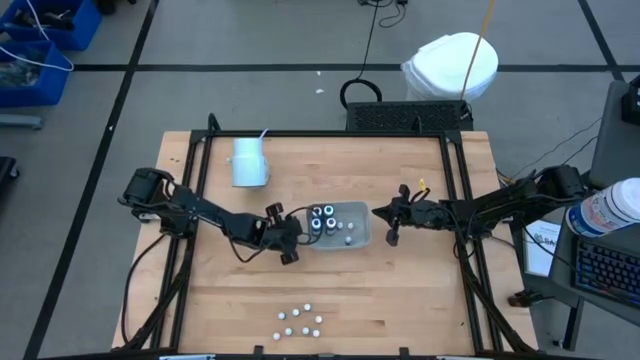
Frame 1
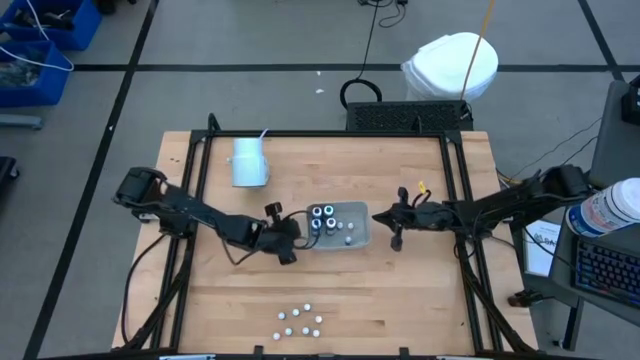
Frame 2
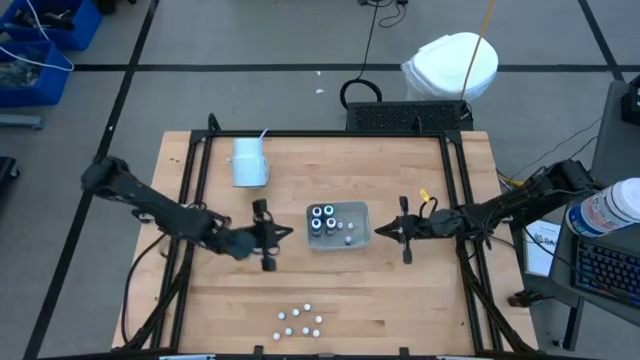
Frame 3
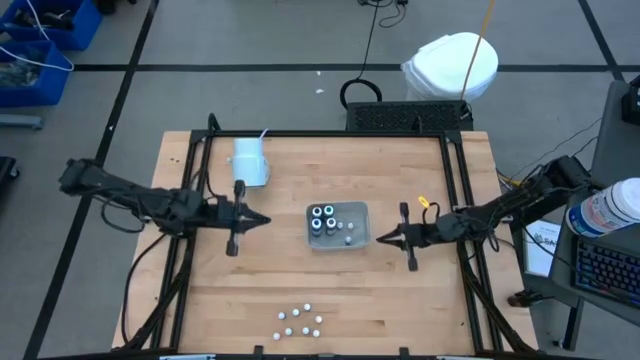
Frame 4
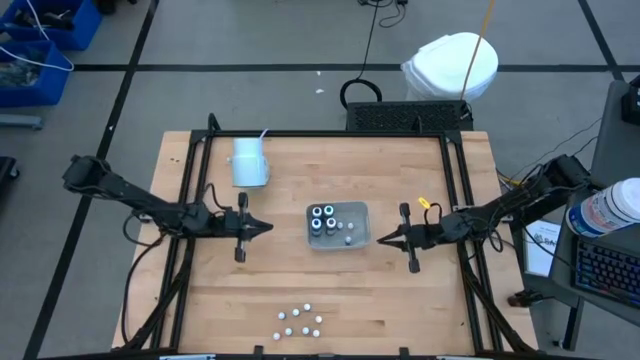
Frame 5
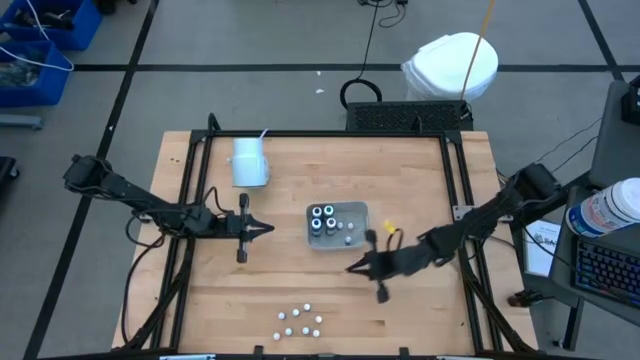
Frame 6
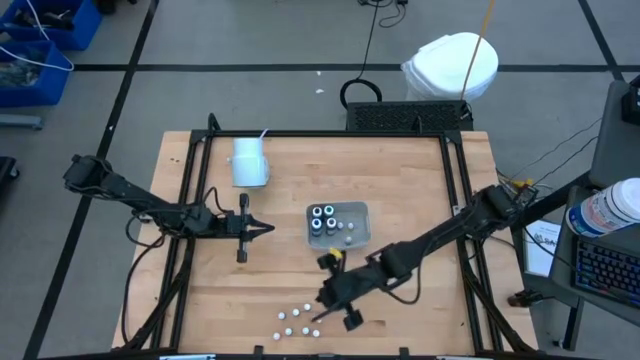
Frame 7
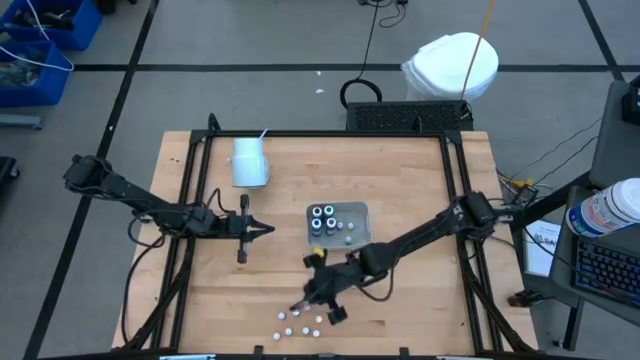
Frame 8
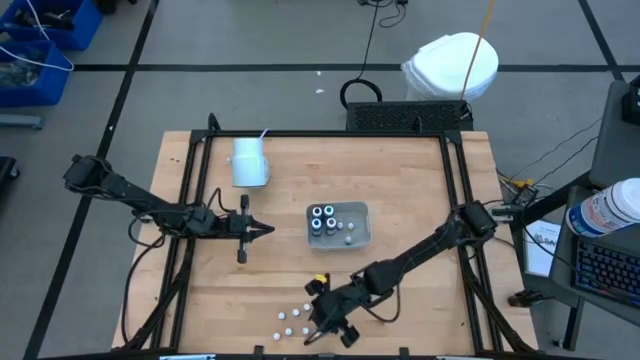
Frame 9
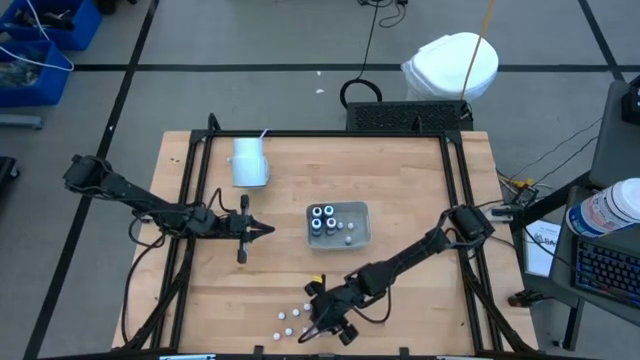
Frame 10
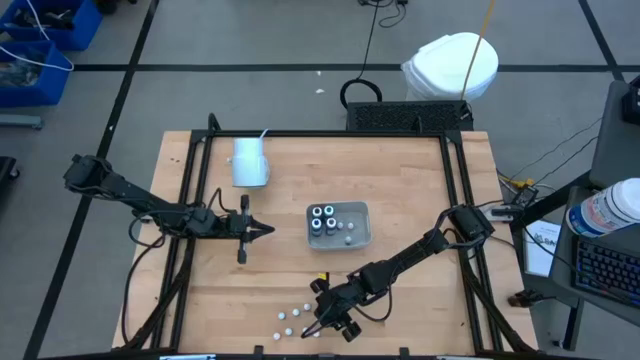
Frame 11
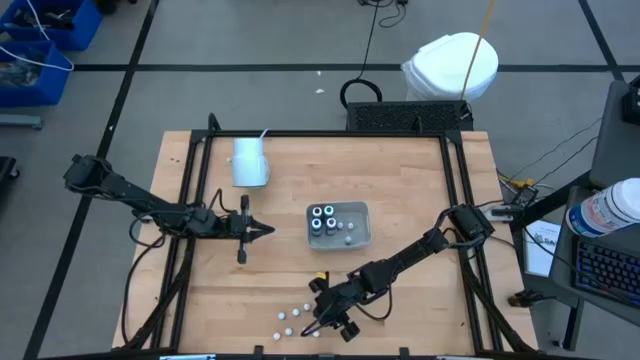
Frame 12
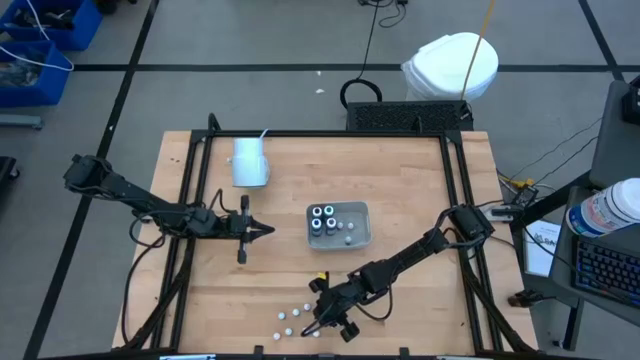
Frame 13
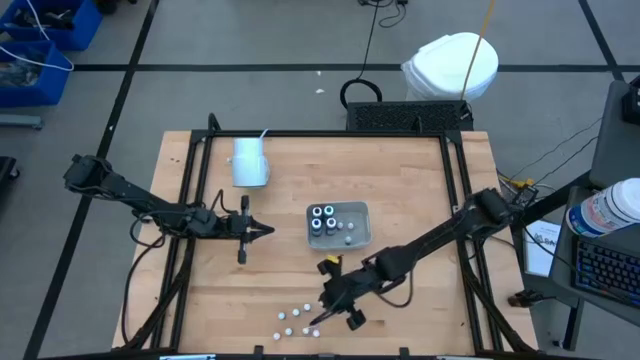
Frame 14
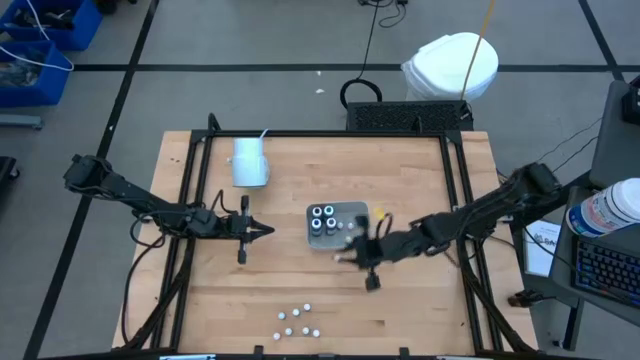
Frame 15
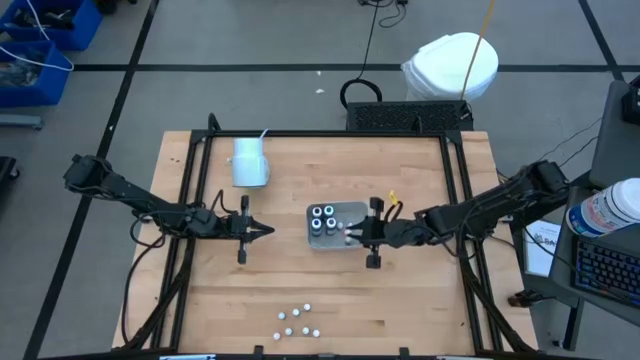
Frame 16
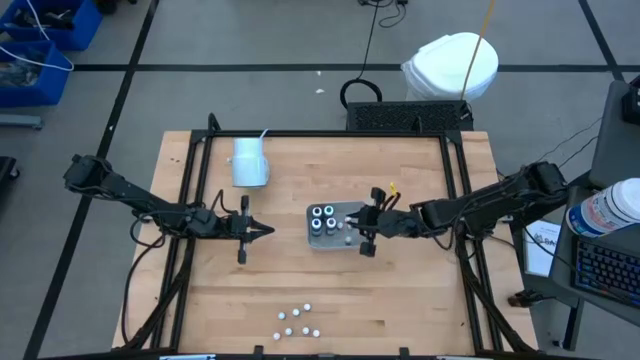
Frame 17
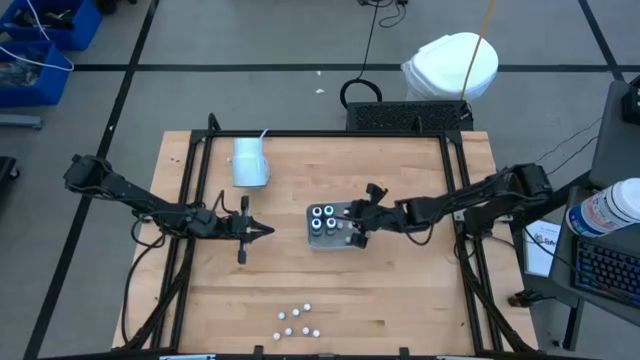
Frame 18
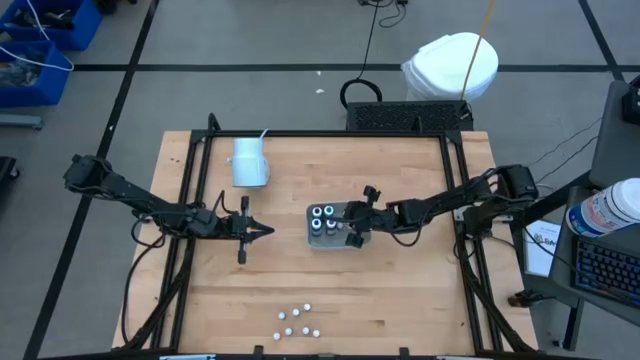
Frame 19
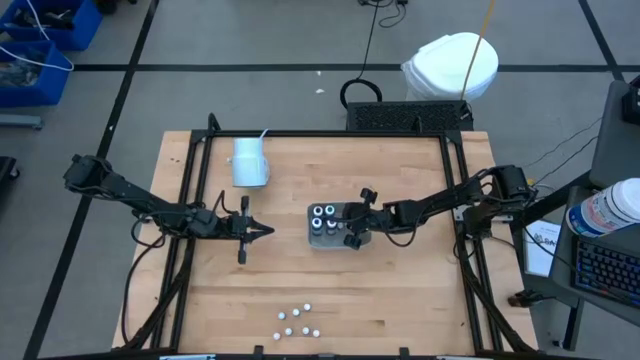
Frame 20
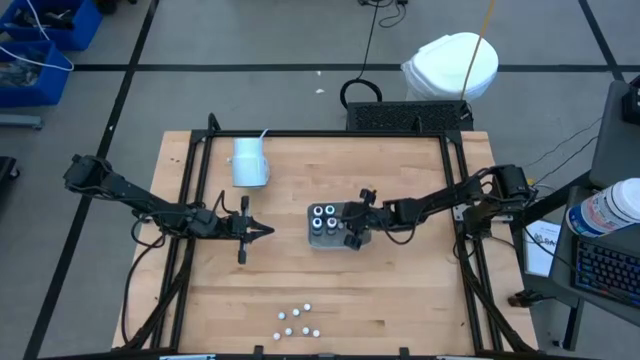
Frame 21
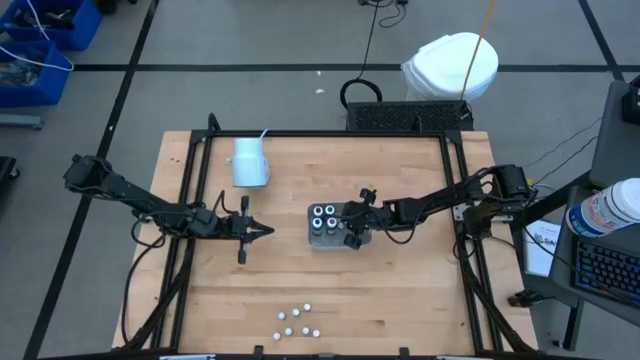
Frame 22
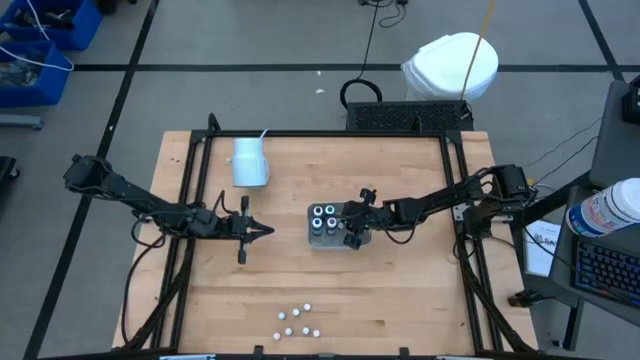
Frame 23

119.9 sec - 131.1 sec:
Task: Pick & Place food coloring
Put the small orange food coloring bottle into the white container

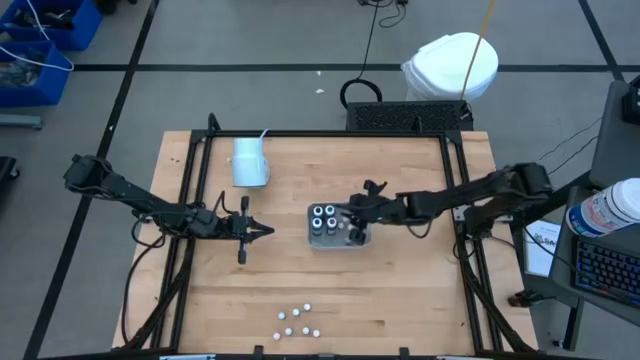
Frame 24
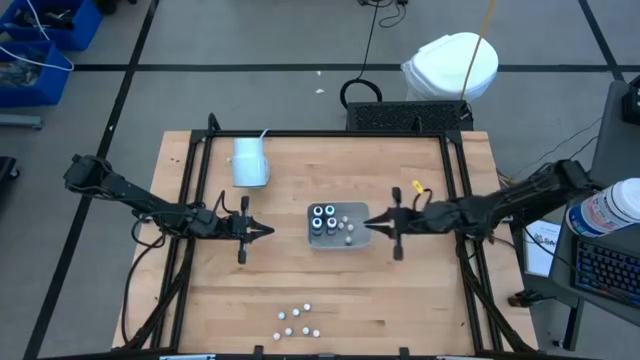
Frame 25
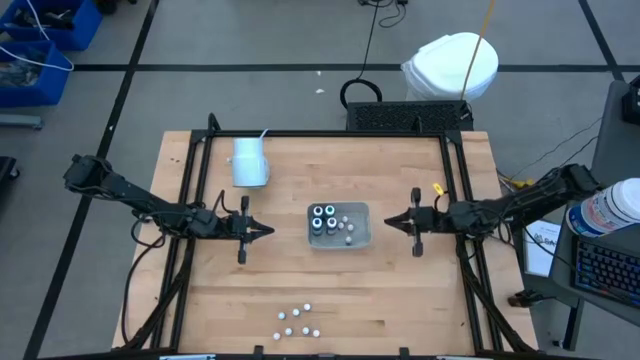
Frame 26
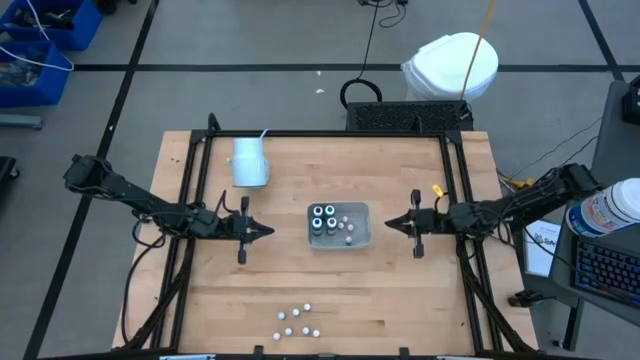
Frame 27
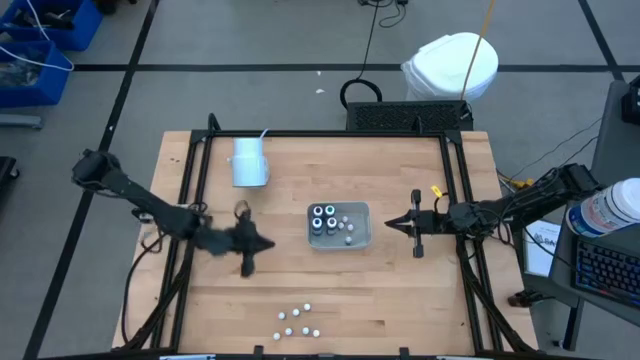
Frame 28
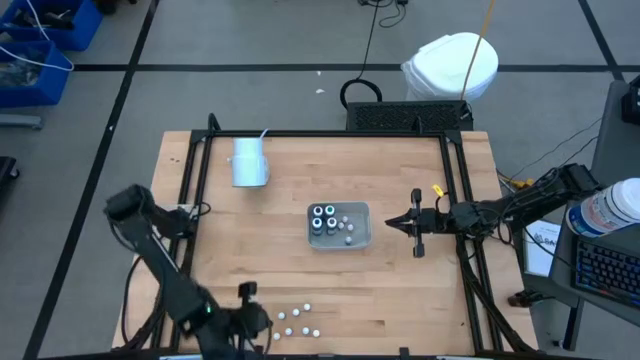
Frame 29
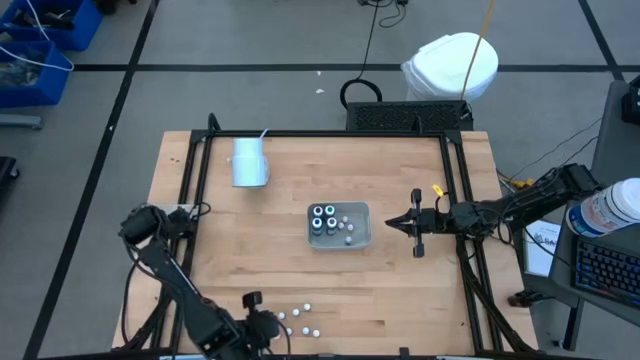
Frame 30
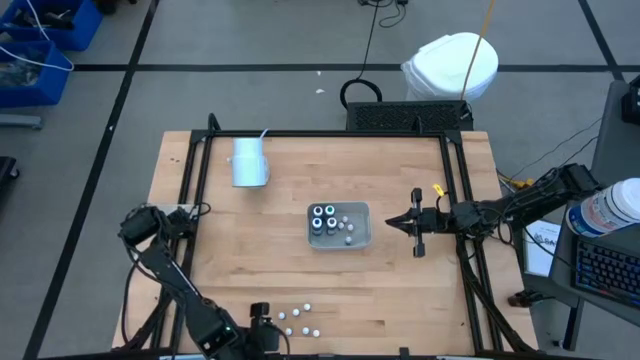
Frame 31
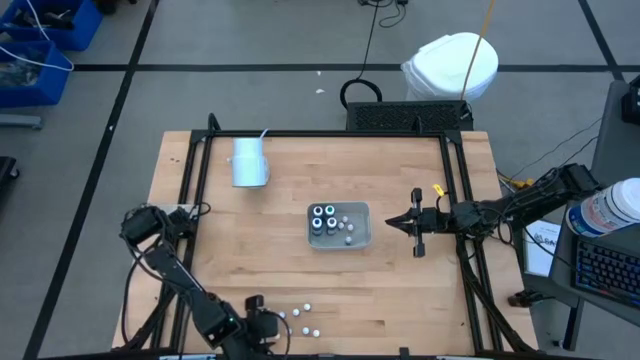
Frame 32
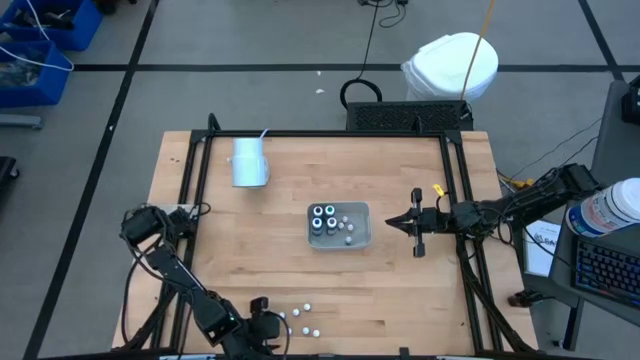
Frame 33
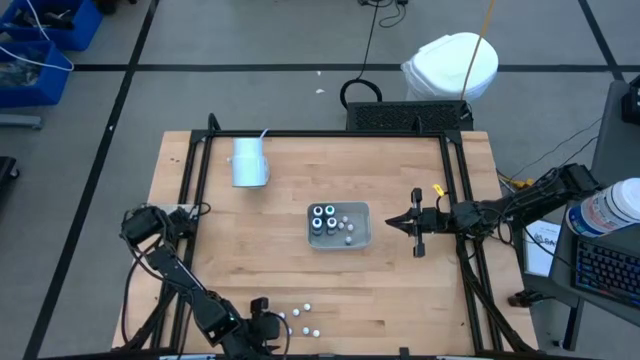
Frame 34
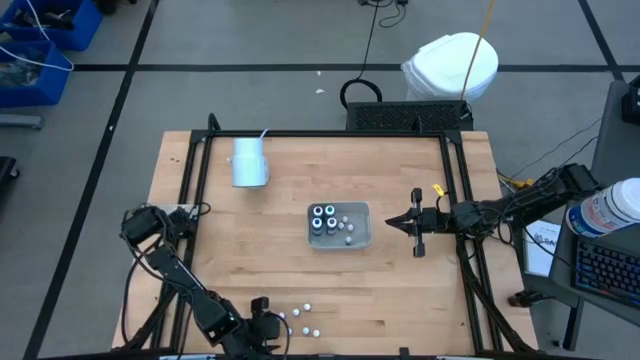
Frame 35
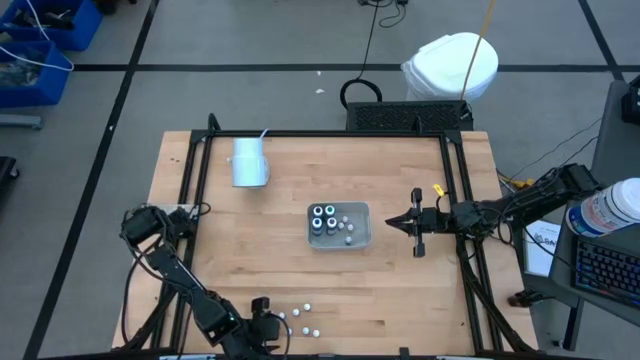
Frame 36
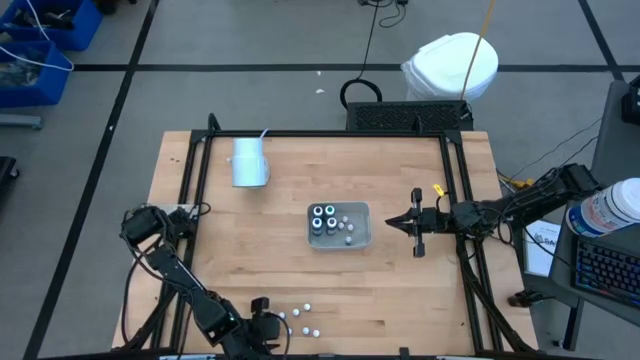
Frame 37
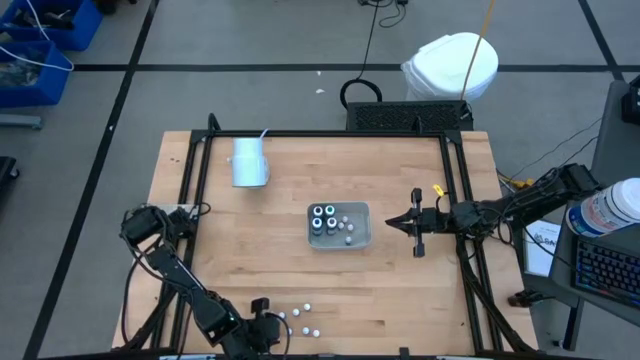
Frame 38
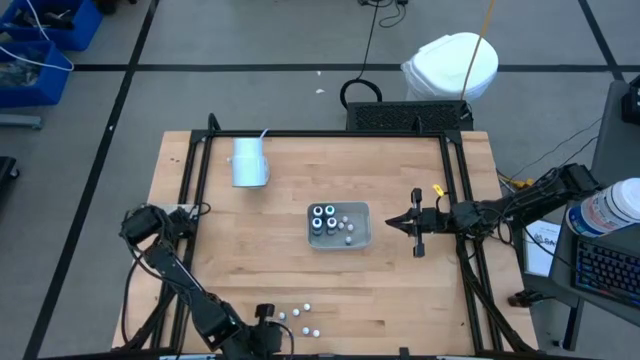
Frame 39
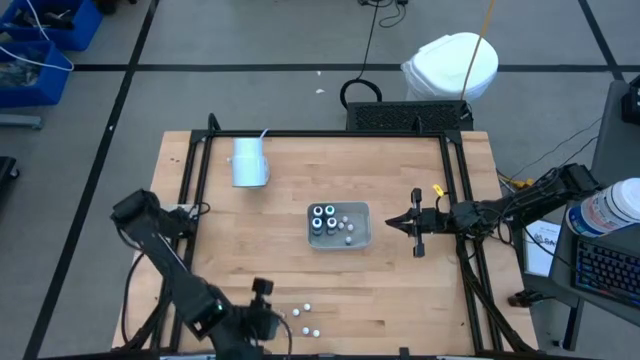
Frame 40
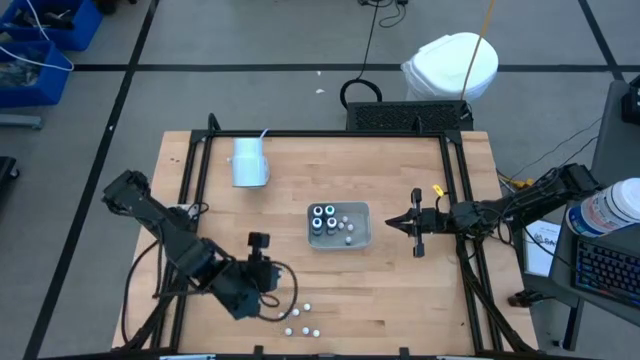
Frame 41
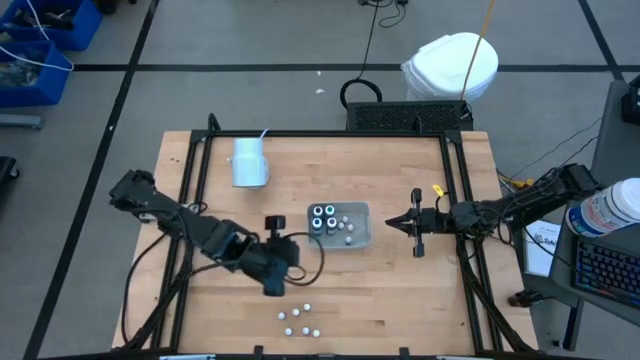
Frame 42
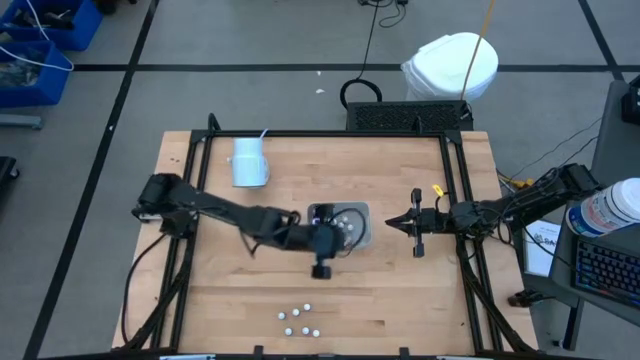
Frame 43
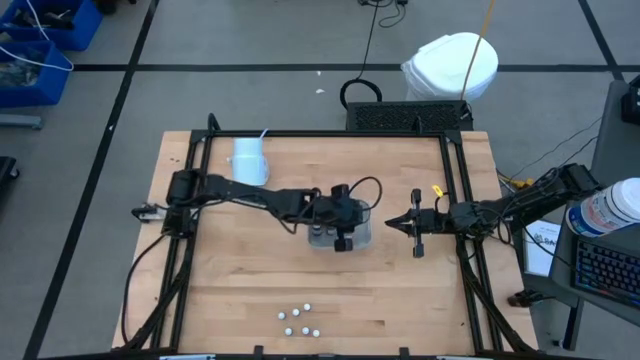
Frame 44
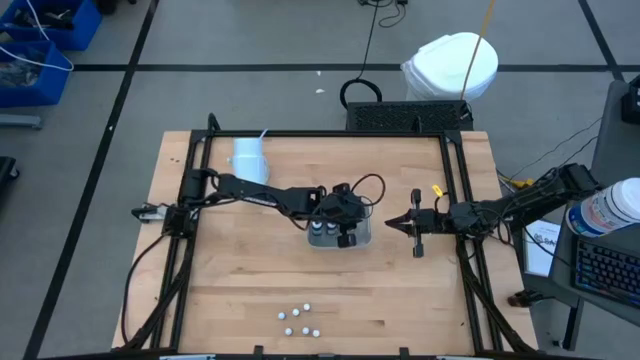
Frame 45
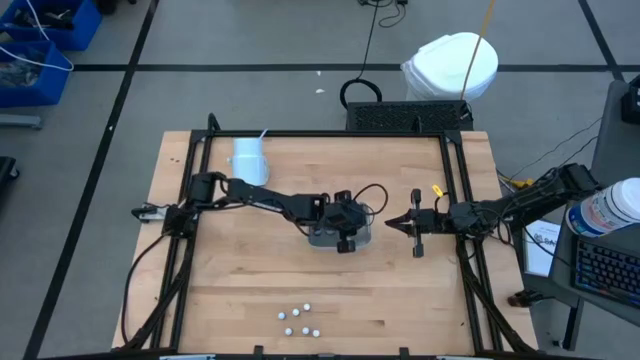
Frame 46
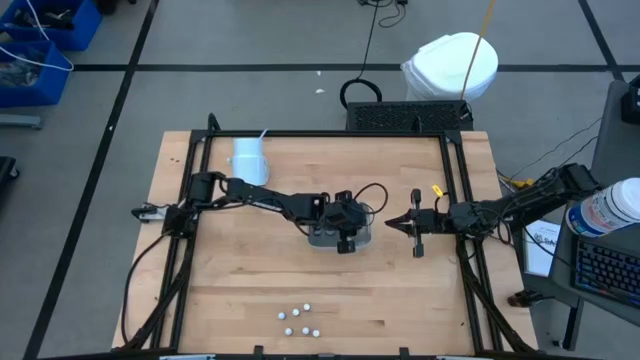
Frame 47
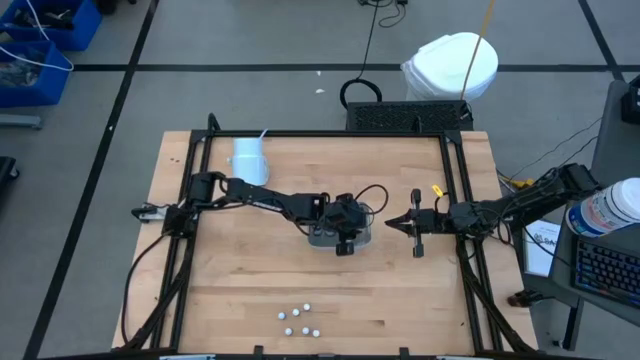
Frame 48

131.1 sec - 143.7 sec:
Put the small orange food coloring bottle into the white container
